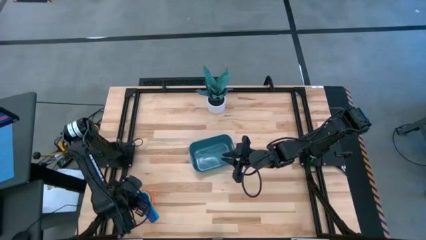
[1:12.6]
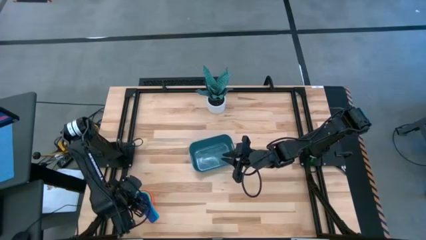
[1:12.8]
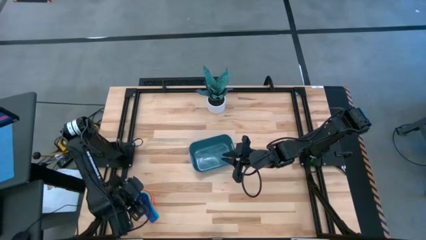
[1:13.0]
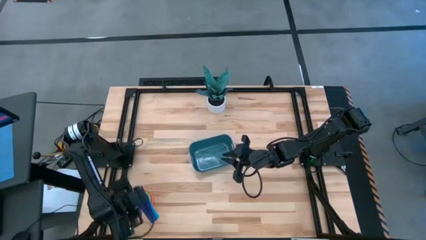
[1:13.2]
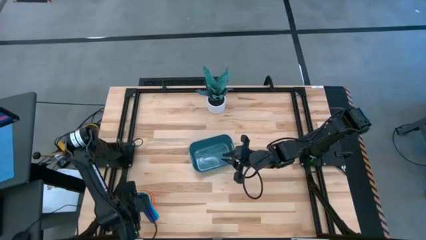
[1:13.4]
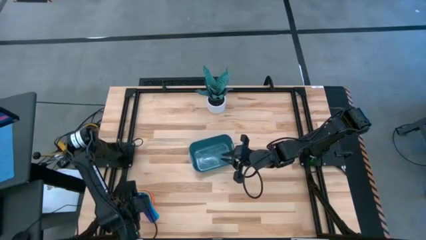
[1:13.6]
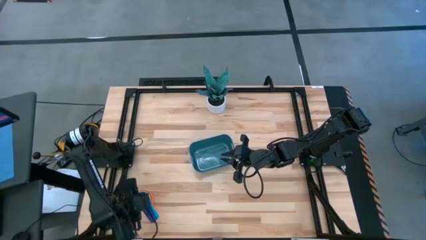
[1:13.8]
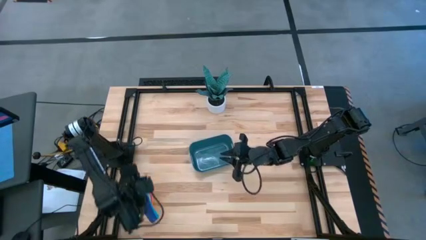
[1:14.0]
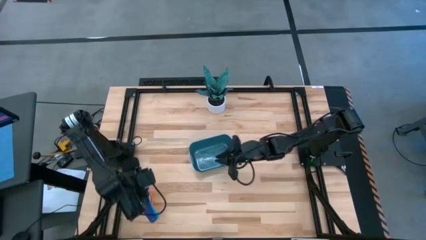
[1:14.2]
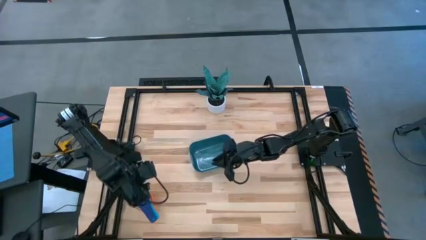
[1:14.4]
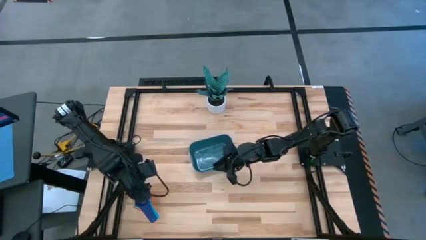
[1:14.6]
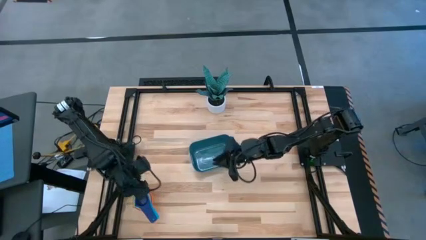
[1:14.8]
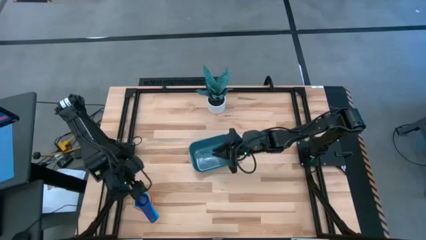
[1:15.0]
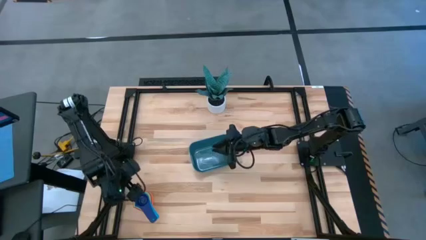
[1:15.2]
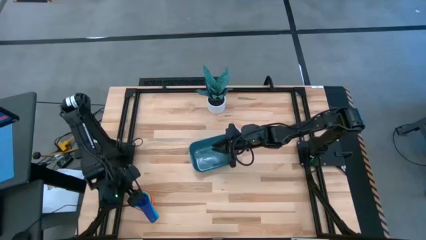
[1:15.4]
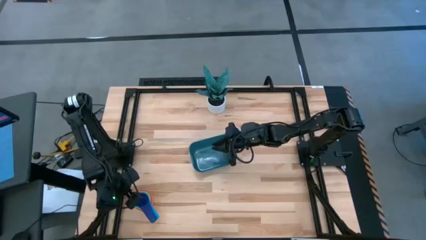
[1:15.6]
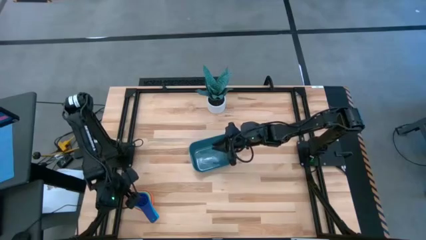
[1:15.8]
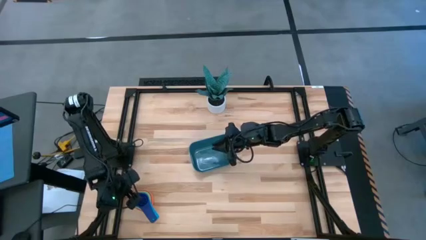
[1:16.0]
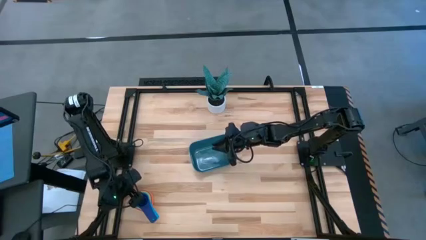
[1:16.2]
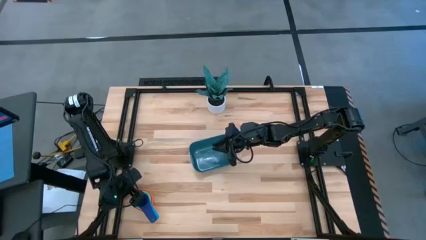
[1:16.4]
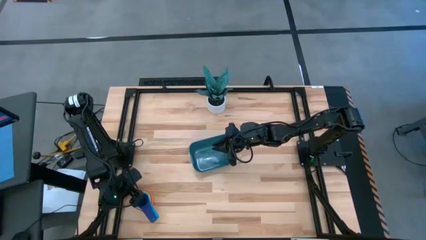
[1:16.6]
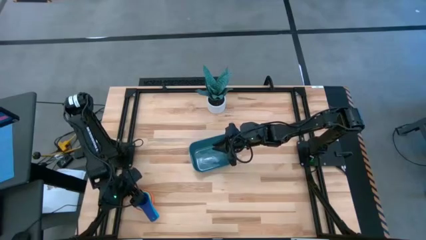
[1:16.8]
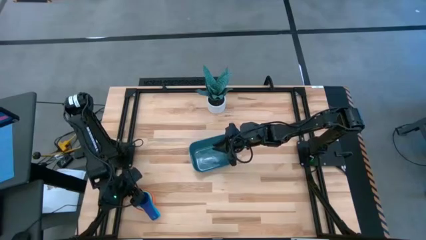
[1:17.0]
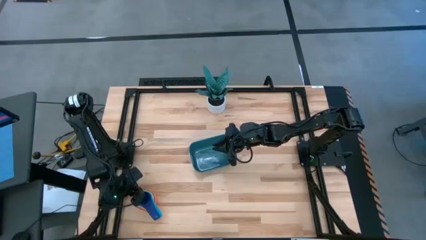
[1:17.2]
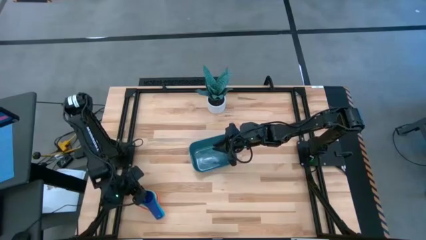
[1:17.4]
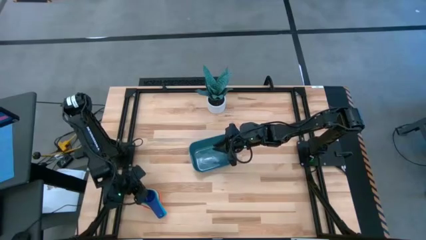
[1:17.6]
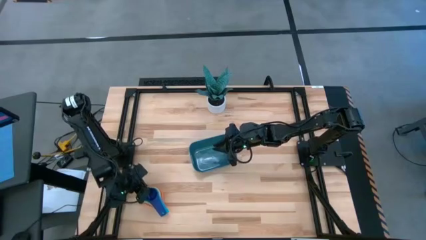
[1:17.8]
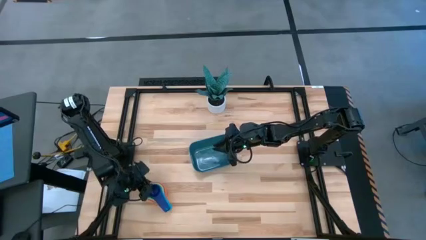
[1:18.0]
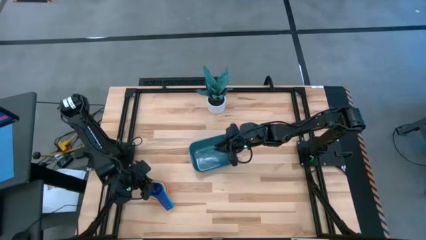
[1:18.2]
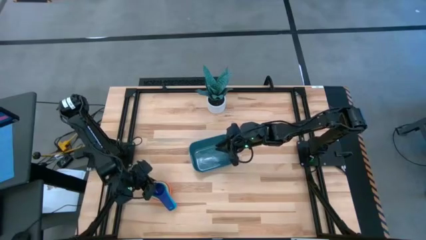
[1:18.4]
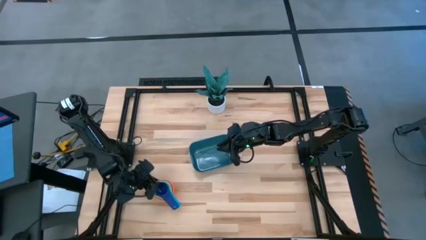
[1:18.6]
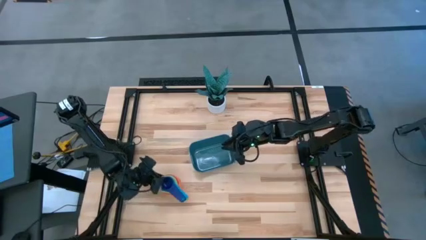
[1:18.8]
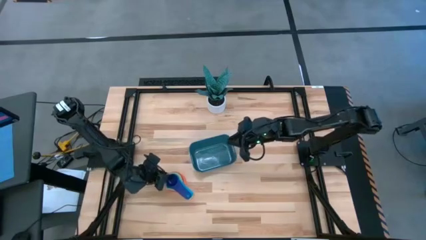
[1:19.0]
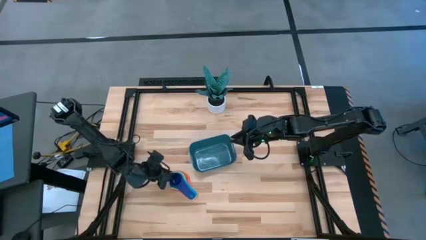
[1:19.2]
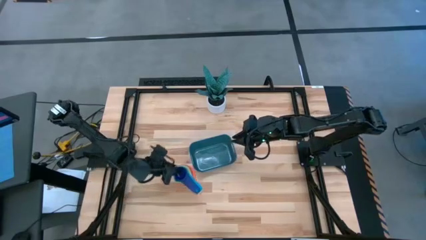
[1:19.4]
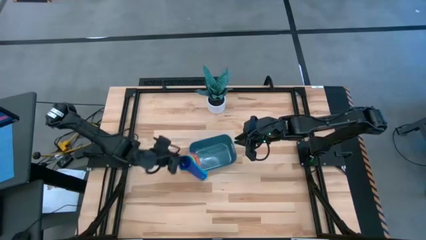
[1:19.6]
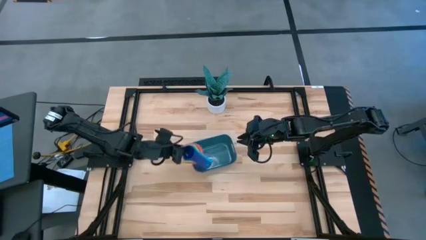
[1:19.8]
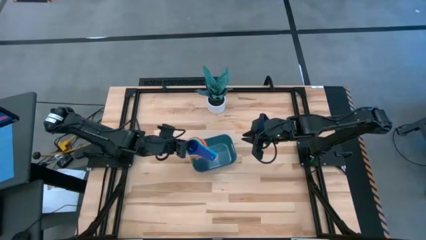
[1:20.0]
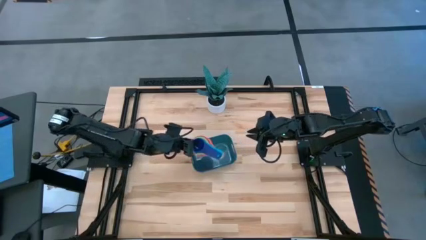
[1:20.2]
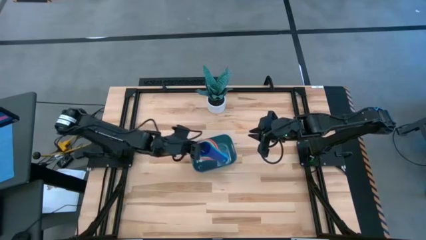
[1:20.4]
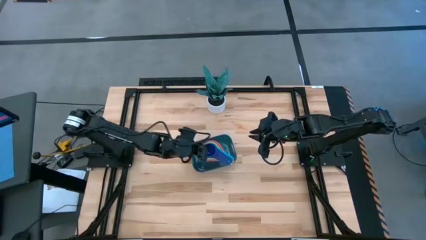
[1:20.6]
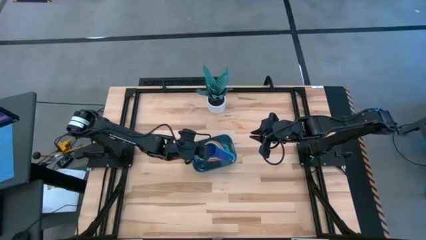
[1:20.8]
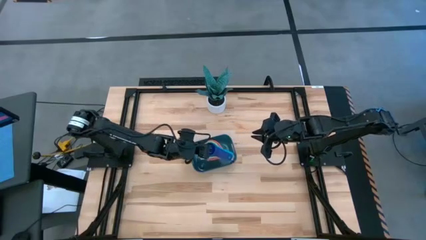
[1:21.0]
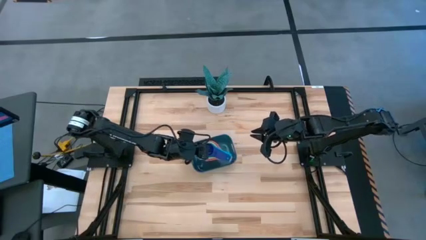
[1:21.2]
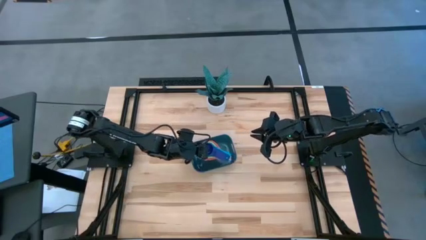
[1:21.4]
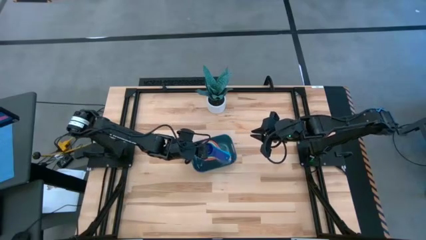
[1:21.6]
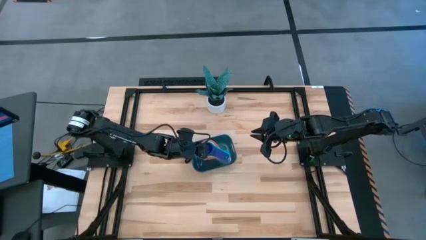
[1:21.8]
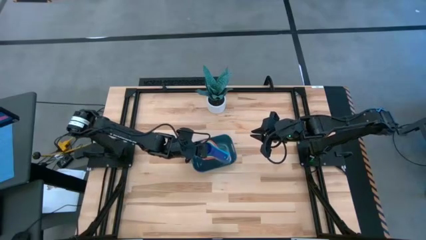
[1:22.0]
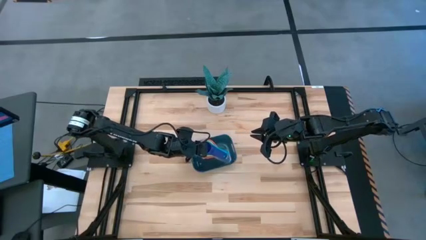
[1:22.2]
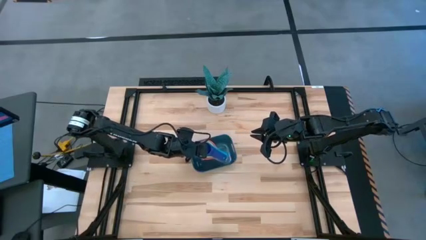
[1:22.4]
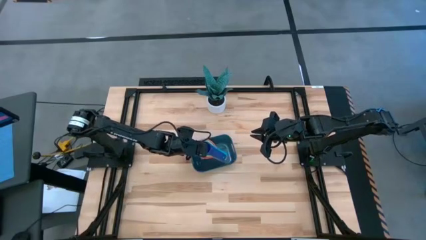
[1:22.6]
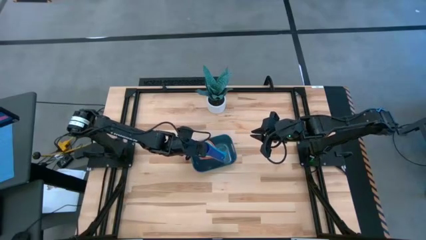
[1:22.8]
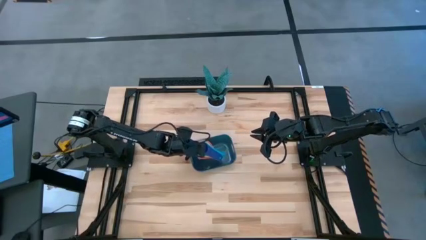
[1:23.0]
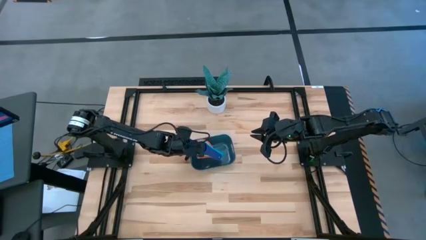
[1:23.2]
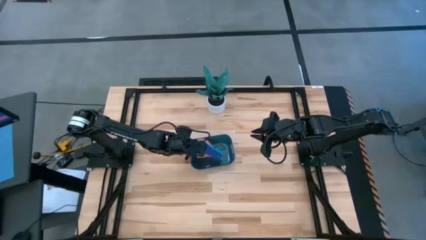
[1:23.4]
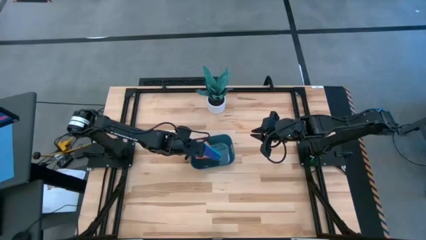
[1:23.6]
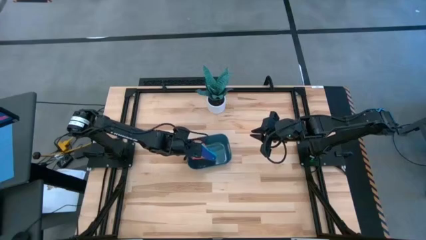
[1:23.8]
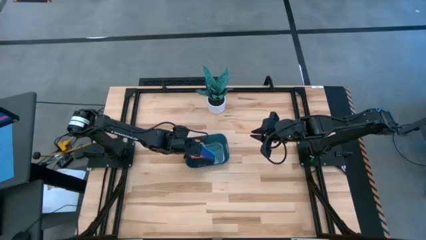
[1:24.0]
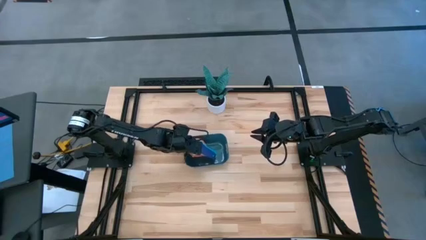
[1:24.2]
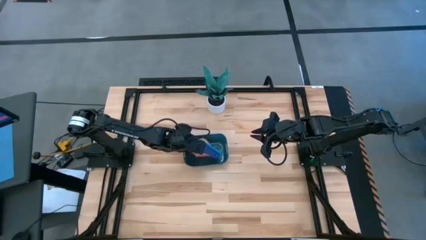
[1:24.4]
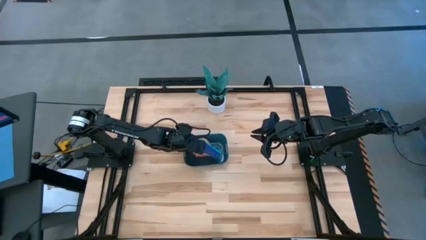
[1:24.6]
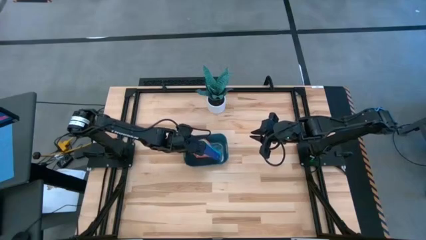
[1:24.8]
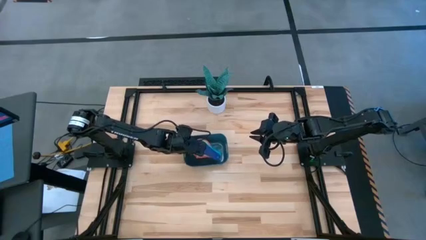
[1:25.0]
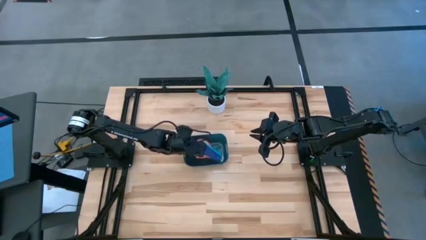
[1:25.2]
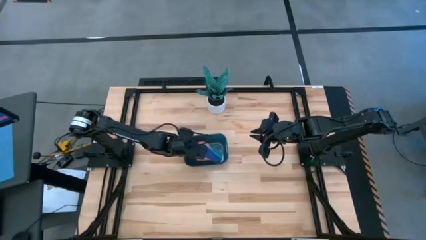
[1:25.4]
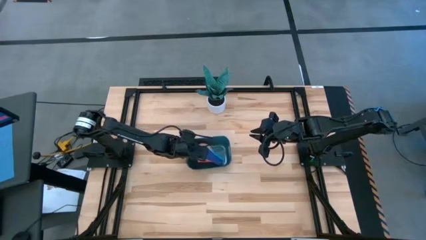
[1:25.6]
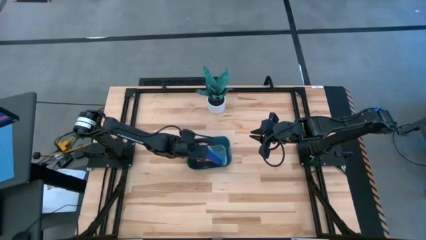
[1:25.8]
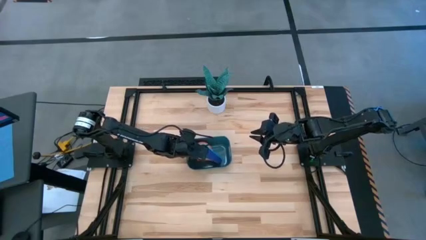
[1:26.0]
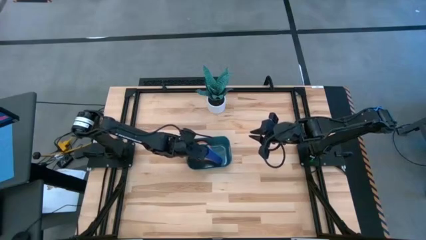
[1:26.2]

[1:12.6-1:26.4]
Task: Nest measuring cups in basket
Put the stack of measuring cups into the green bin

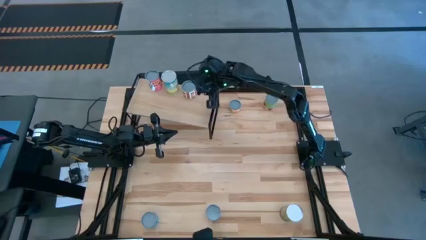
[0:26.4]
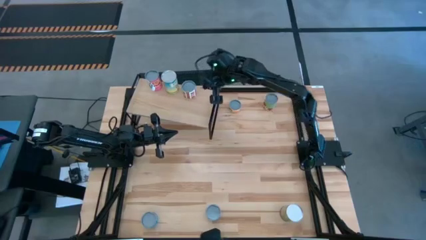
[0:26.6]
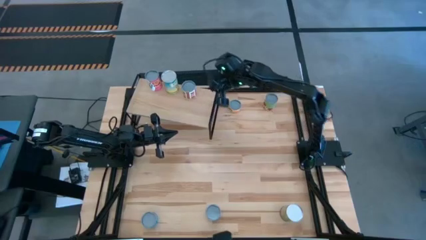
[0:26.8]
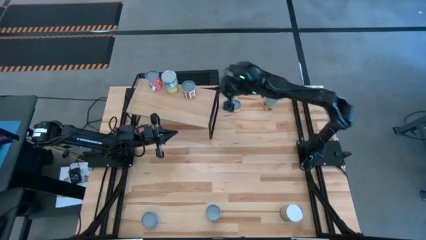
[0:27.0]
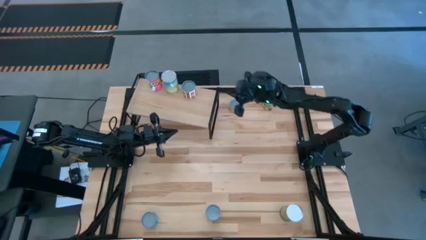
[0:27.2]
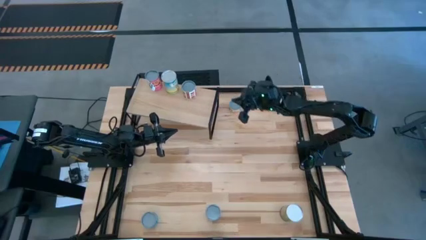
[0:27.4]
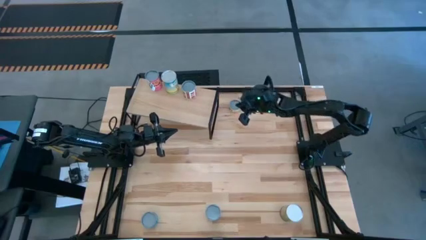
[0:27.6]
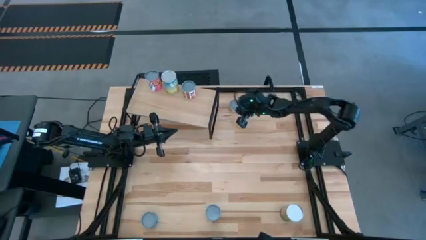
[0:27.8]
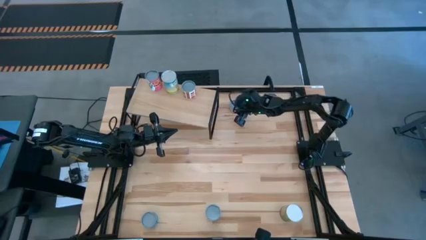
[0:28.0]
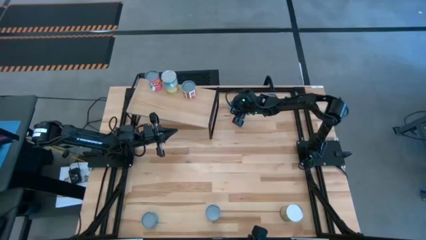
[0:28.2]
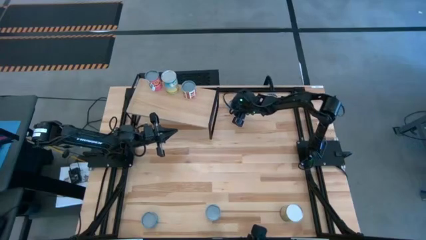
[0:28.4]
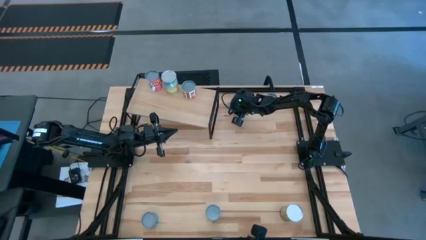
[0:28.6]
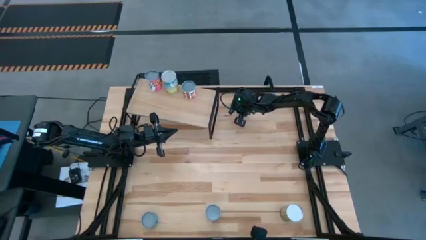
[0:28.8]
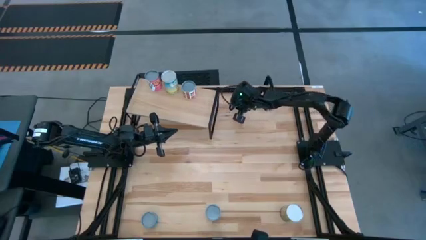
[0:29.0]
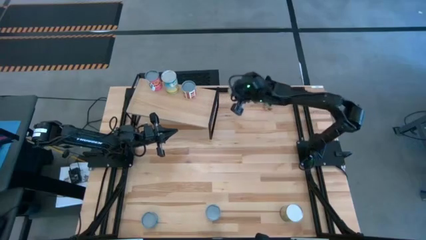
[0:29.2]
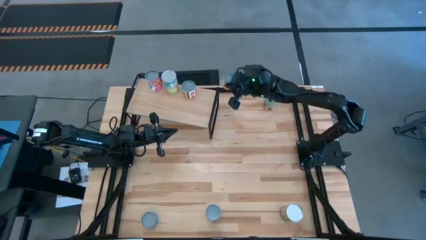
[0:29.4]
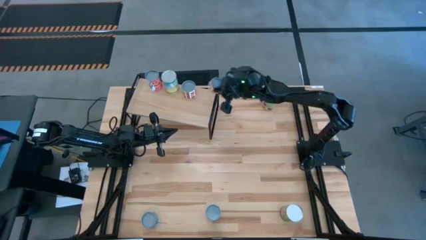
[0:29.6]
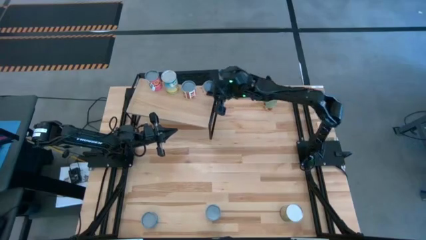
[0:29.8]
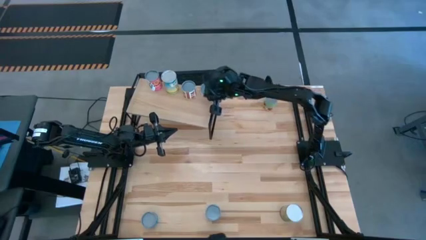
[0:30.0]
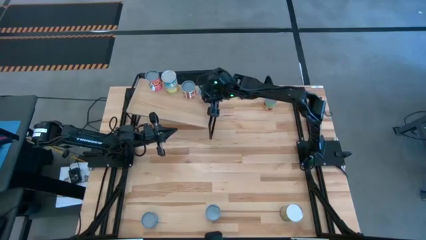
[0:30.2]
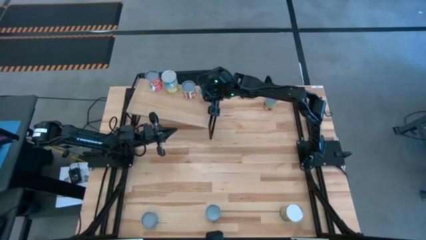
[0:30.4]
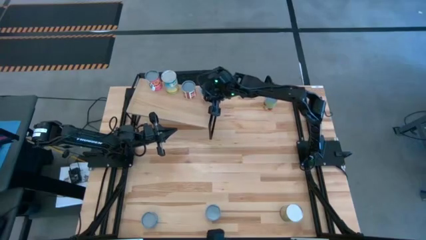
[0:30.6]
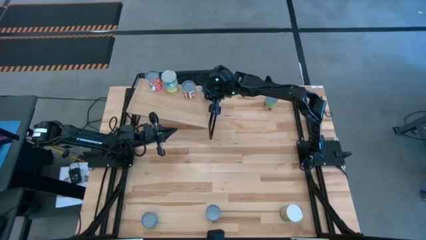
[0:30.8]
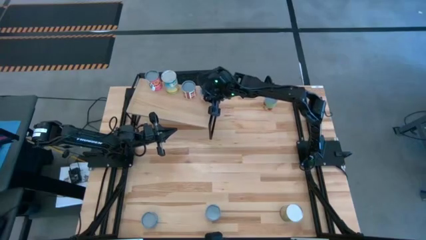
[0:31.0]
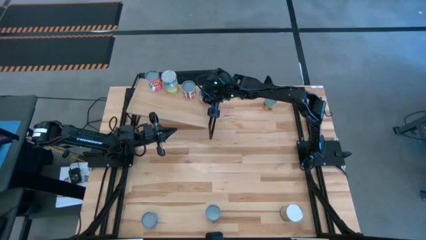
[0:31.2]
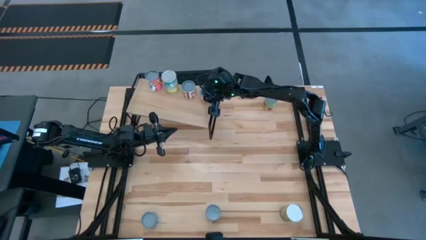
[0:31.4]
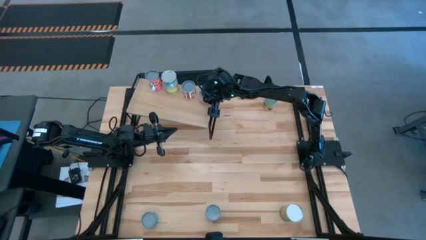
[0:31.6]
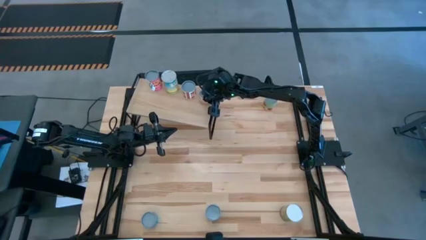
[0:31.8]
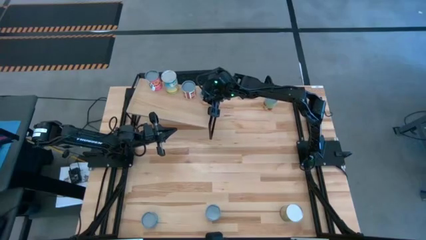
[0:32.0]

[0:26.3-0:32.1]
Task: Pick and place cans onto a shelf
Put the canned mushroom on the shelf
